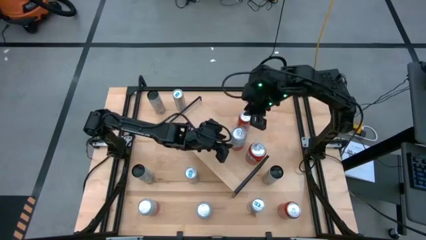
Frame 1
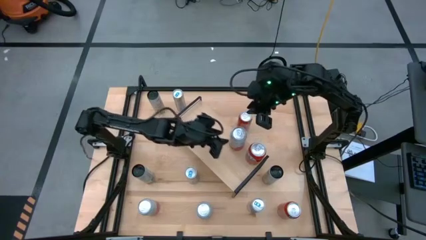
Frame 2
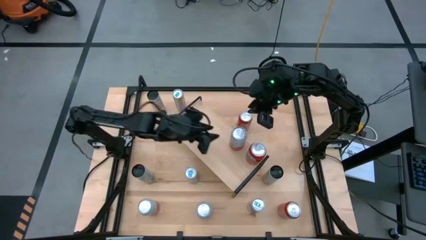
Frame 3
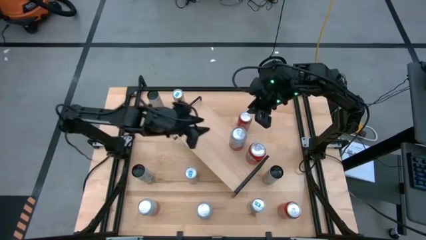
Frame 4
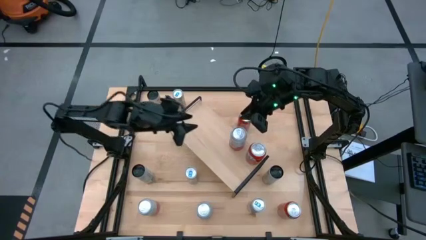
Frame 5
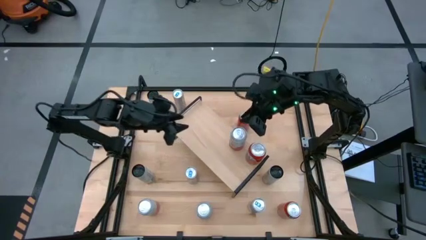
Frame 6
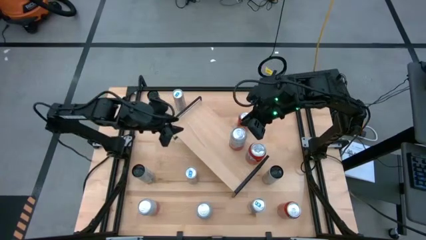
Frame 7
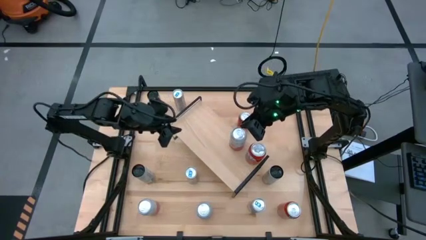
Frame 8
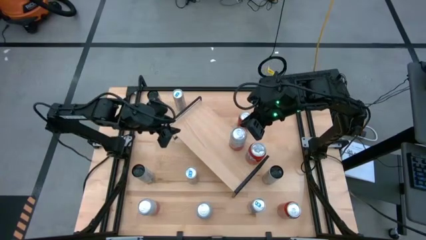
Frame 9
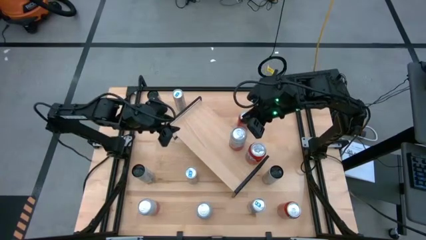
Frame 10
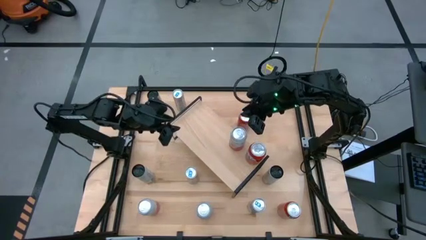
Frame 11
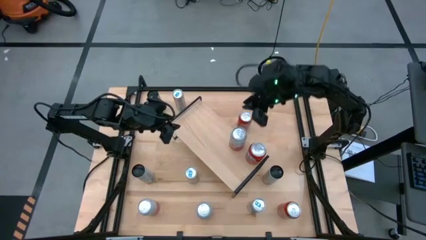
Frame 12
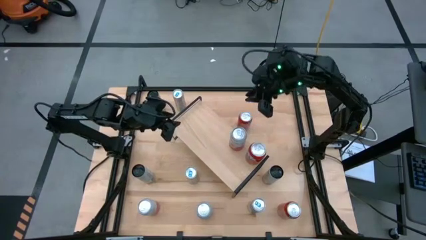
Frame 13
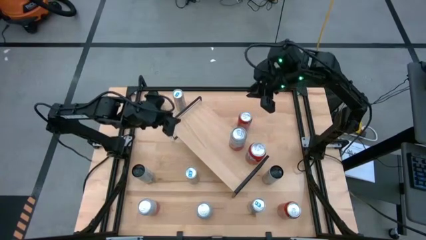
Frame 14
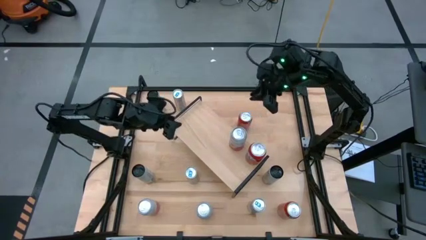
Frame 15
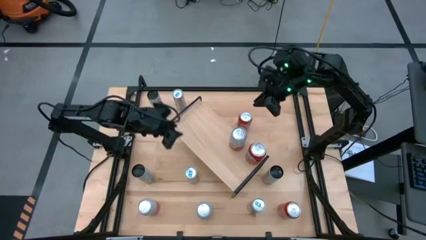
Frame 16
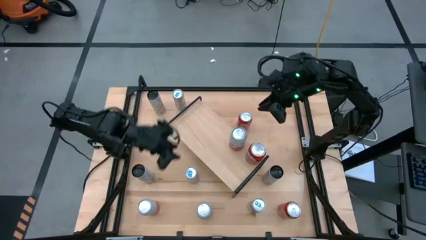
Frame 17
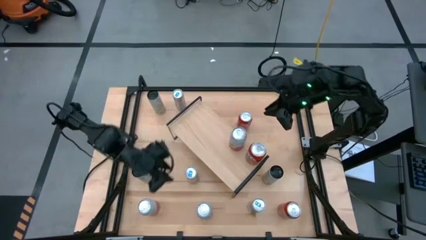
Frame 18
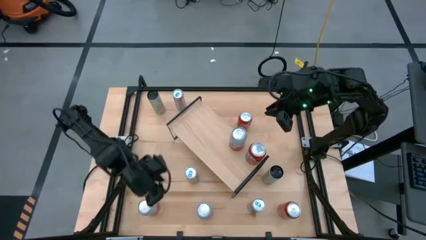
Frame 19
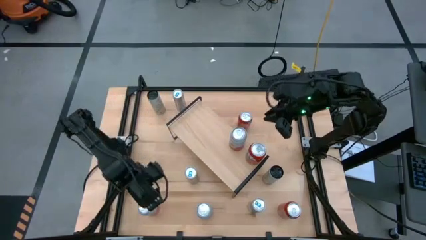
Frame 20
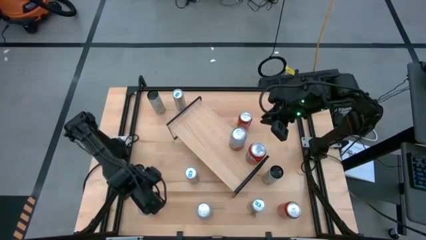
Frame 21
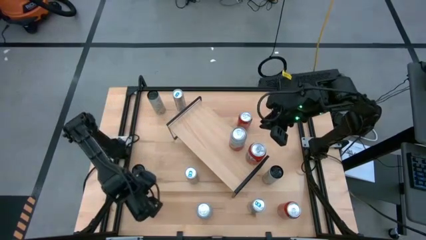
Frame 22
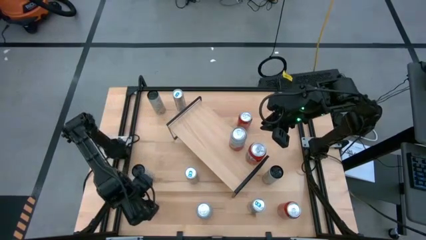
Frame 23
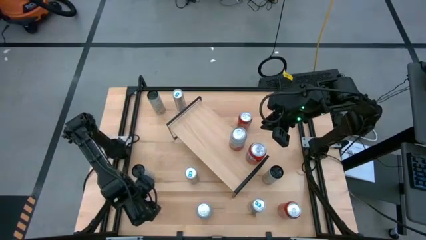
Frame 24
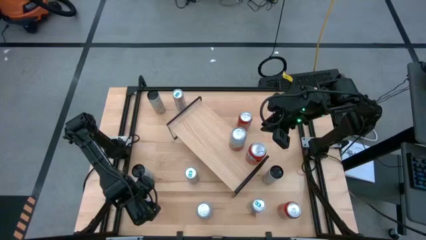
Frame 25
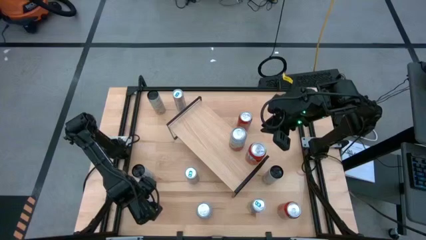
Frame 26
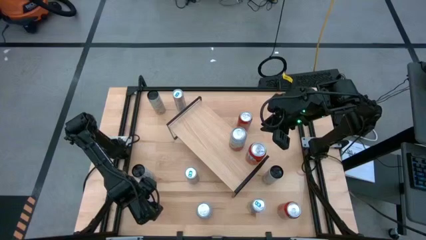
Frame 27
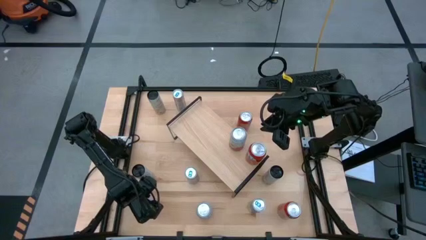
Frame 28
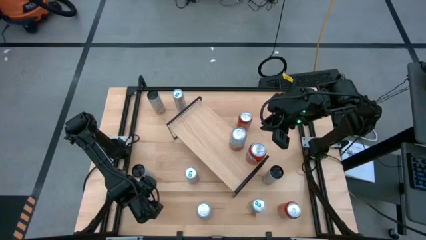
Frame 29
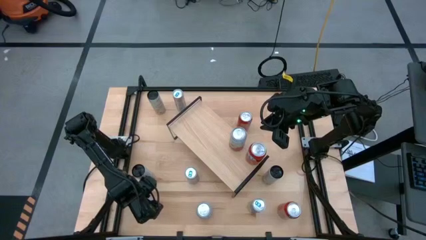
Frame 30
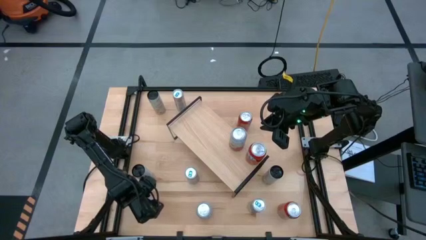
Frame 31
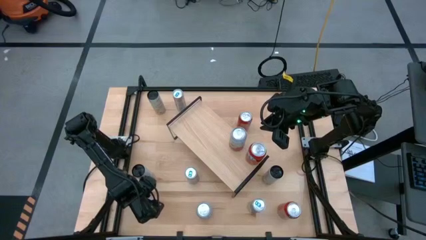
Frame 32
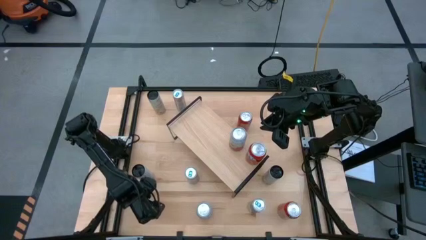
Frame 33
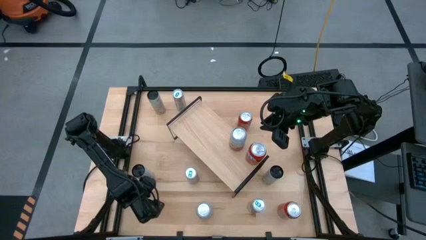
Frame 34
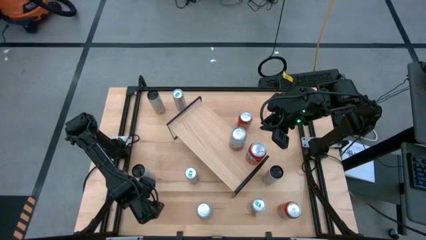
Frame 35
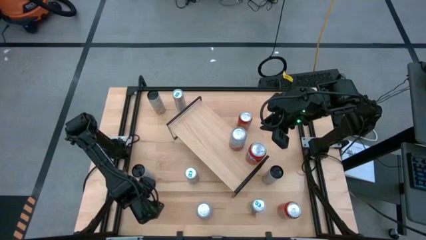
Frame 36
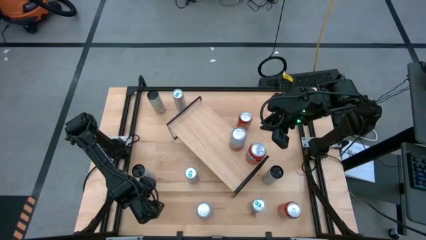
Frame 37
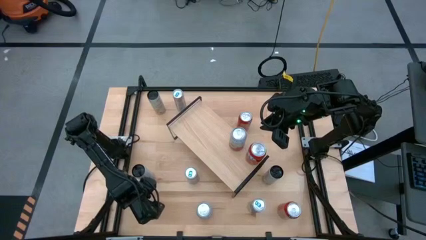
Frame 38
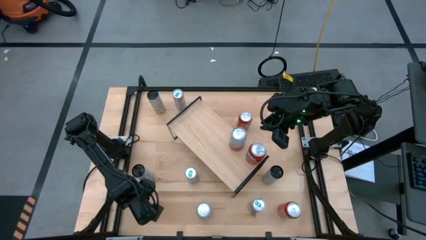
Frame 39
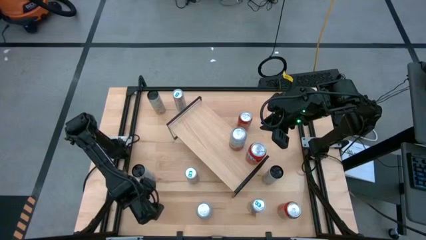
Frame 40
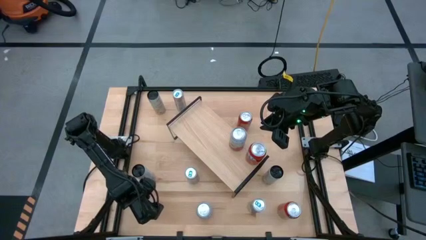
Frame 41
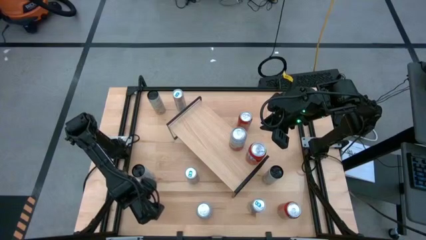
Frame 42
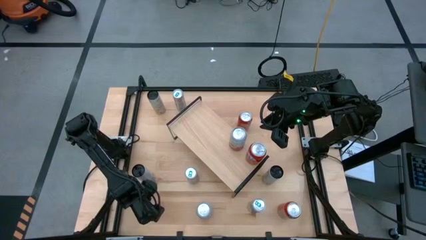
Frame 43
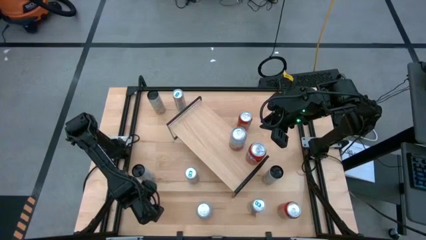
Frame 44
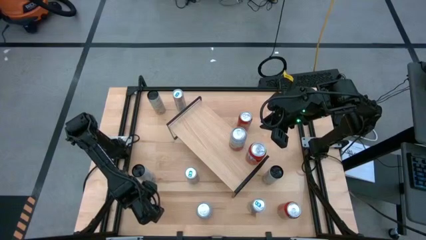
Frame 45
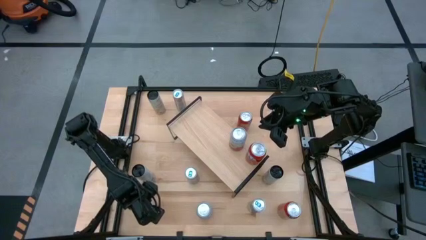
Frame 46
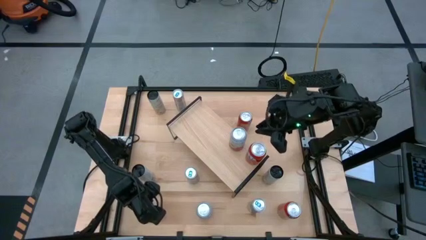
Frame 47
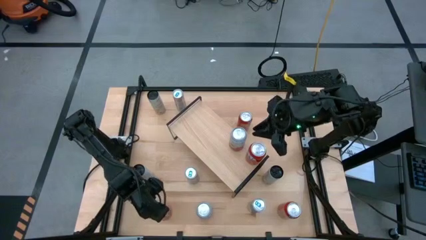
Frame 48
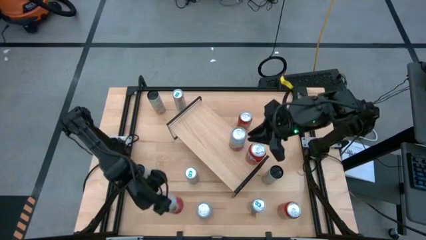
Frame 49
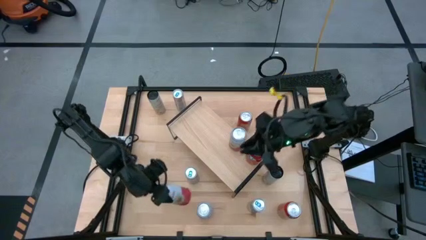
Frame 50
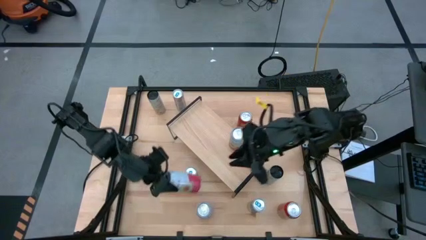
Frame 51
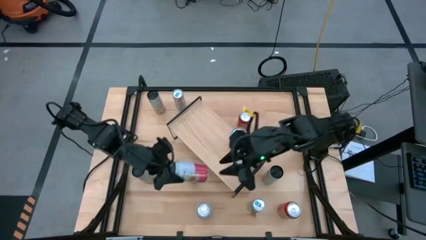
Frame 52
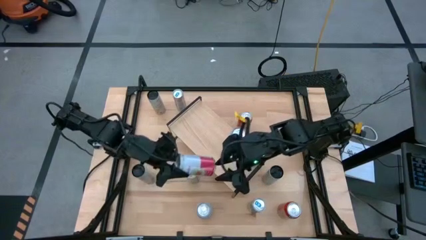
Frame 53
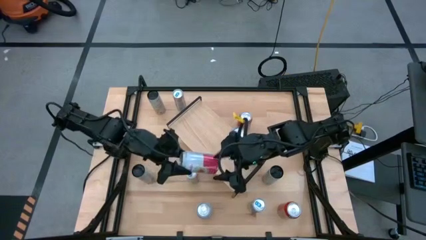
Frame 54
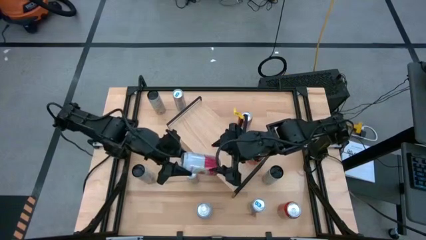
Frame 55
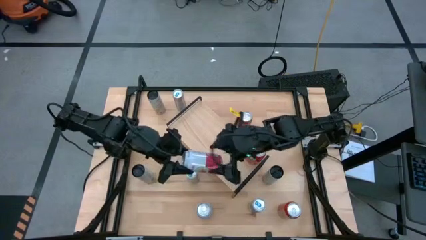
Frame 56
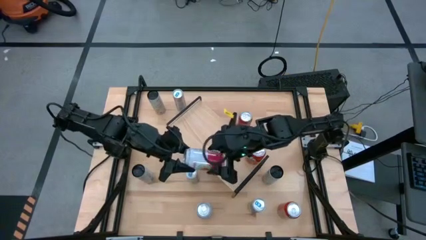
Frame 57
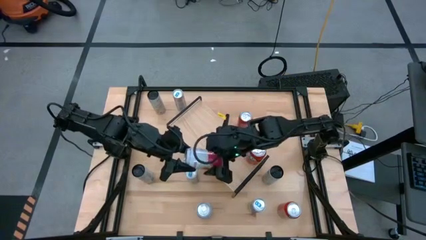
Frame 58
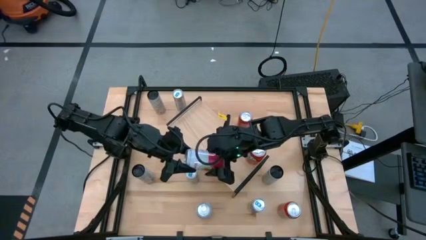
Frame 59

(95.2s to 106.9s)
Task: Place canned beverage on shelf
Put the left pink white soda can on the shelf aligned with the other pink white soda can

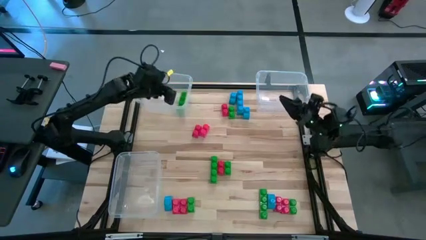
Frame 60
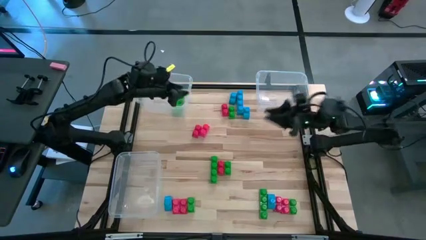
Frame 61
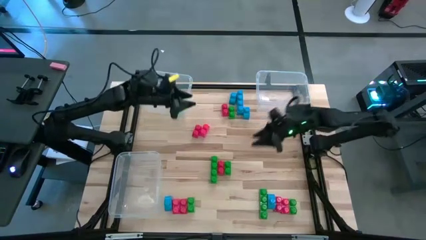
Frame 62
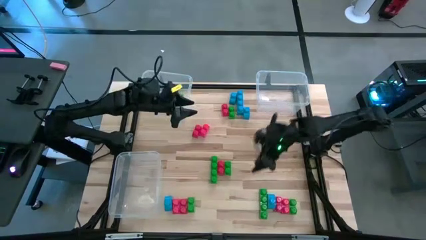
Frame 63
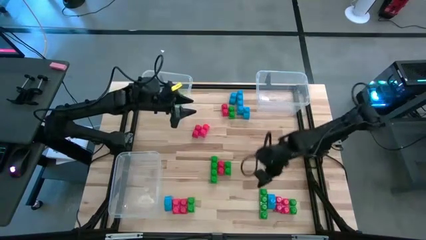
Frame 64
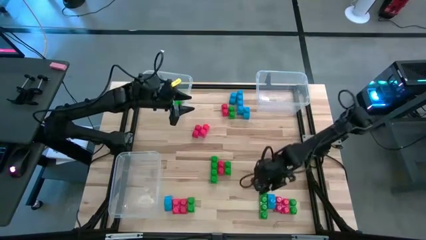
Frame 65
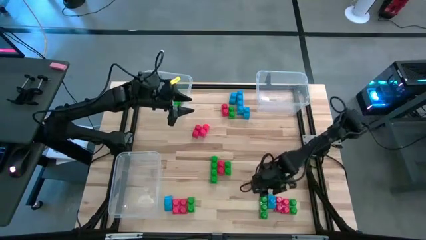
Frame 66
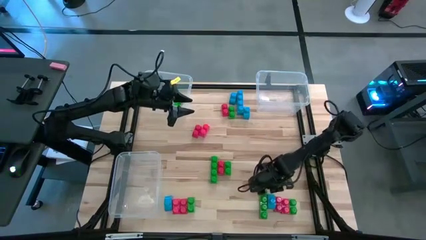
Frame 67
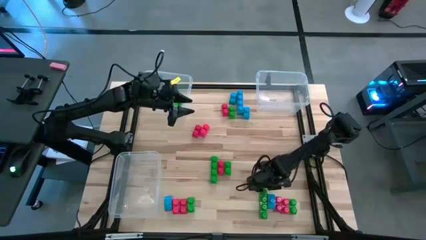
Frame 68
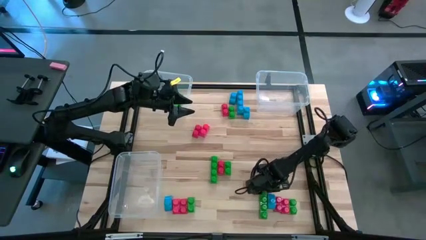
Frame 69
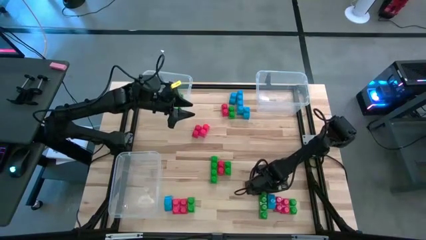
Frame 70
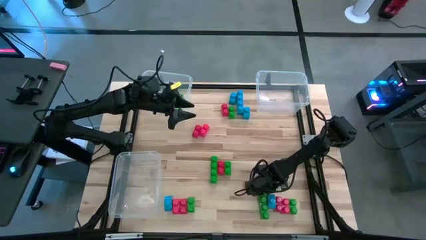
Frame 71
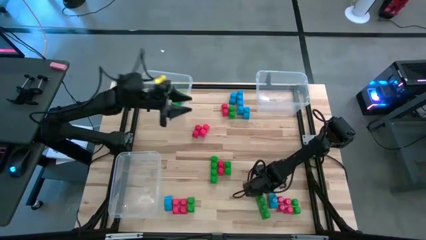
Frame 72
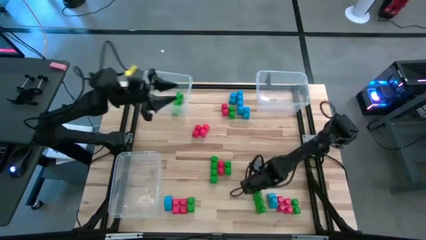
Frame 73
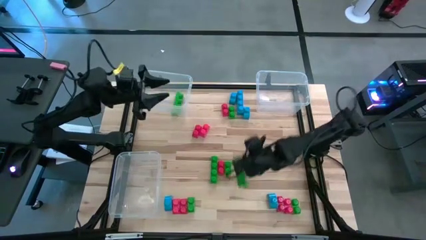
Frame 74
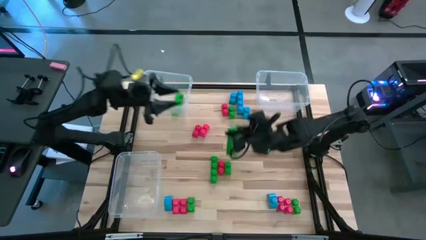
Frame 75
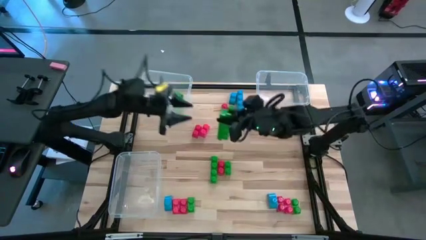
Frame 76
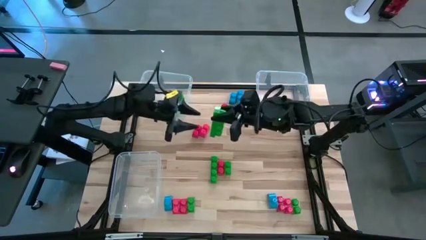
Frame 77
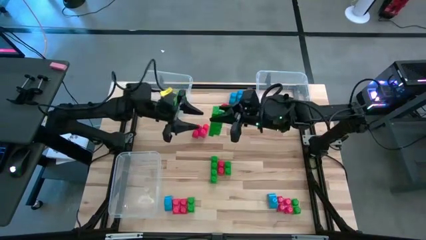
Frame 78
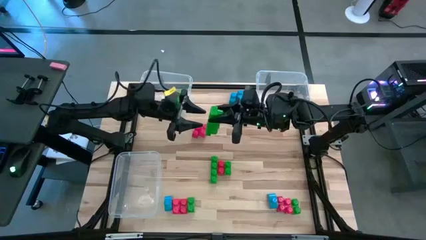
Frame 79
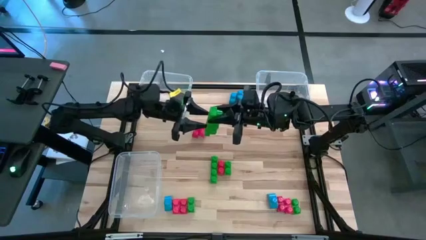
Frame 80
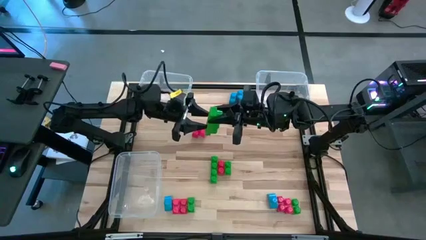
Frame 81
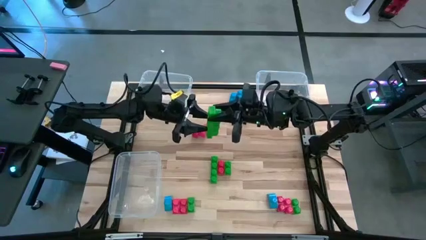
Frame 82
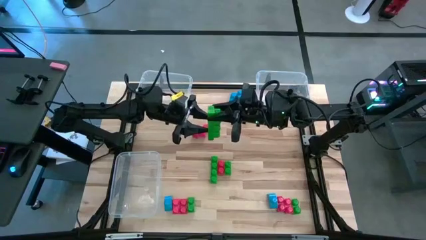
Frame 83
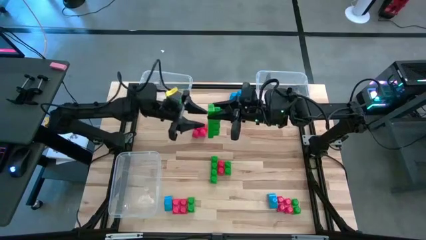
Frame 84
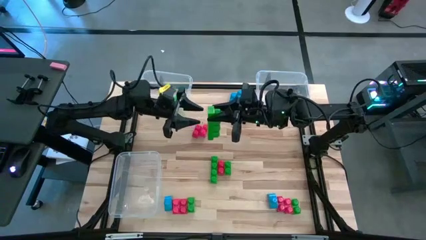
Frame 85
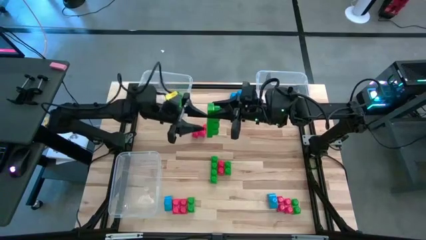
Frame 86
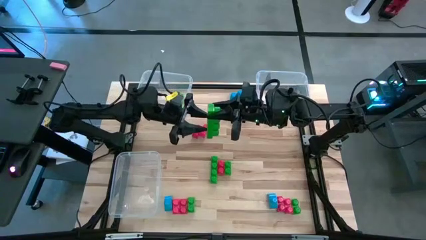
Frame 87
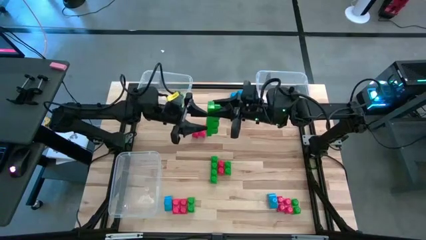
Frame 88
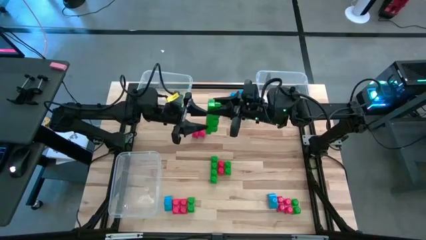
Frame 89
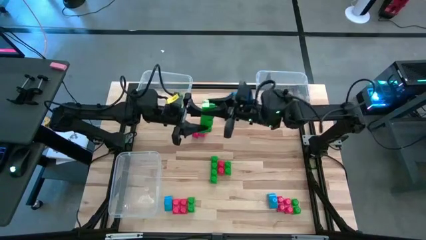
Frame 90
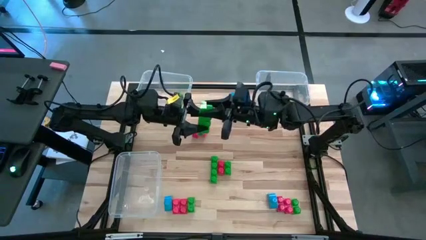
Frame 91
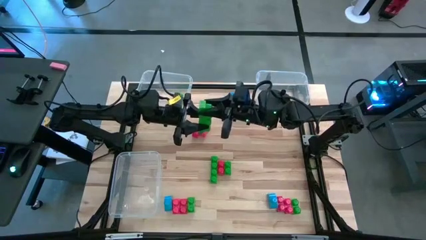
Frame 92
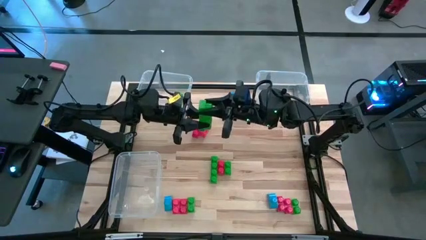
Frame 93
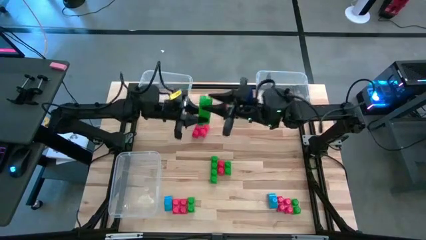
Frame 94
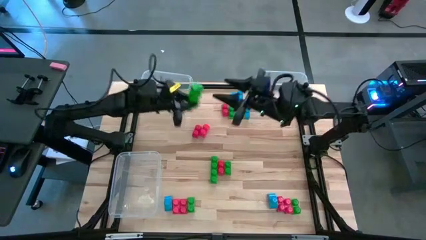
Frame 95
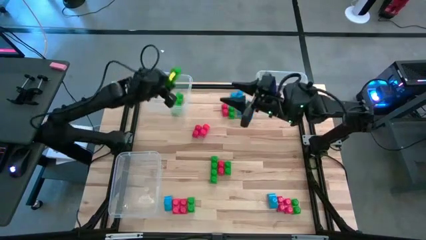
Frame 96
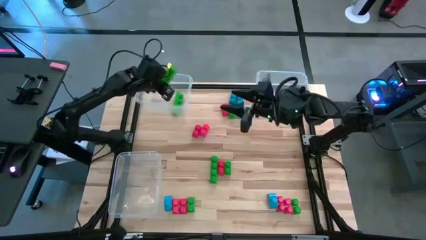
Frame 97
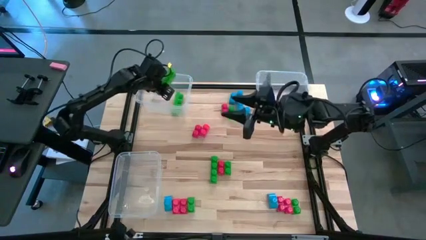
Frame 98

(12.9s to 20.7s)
Task: Sort blocks
Put the green game piece into the top left transparent bin
